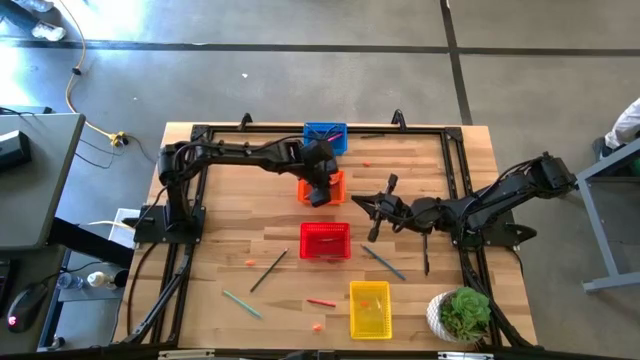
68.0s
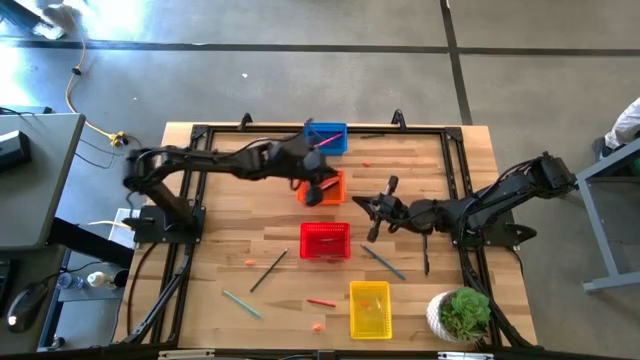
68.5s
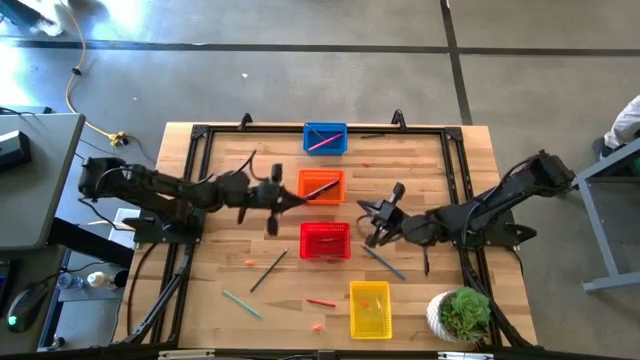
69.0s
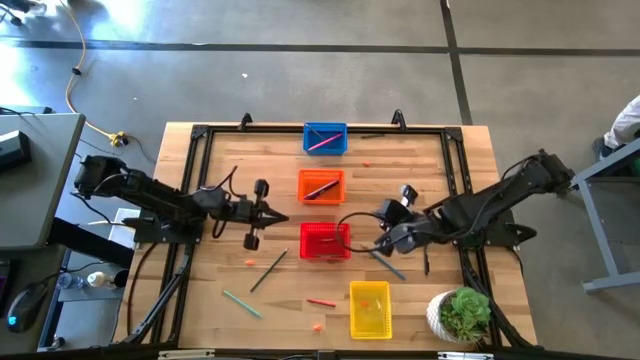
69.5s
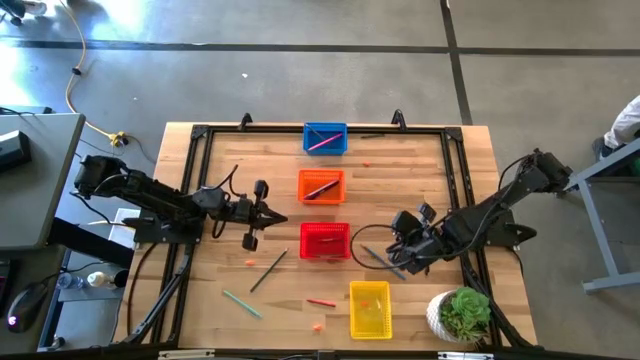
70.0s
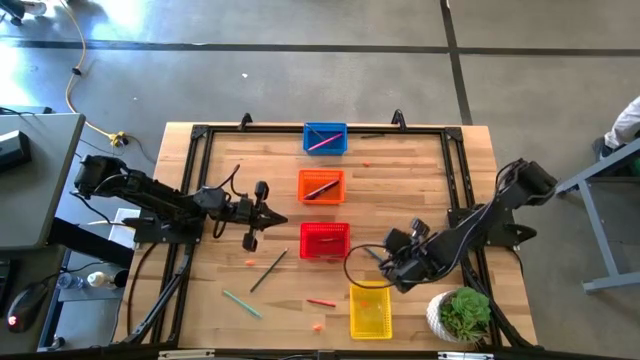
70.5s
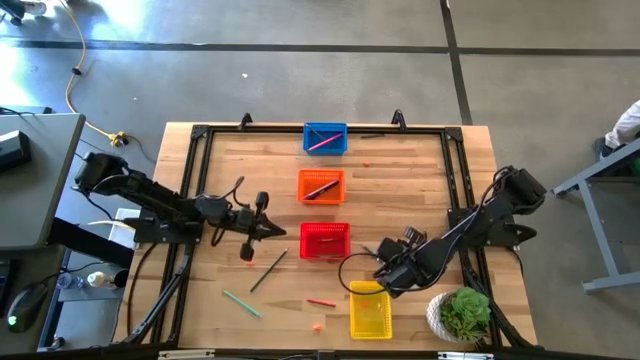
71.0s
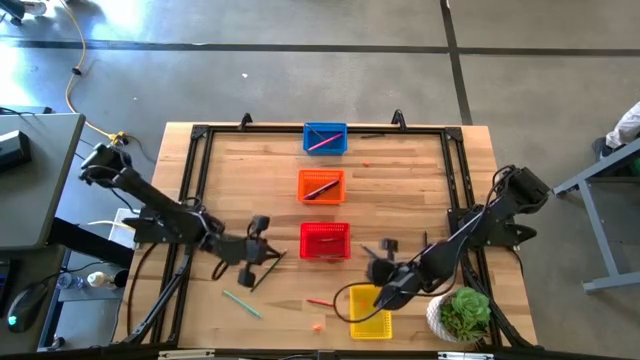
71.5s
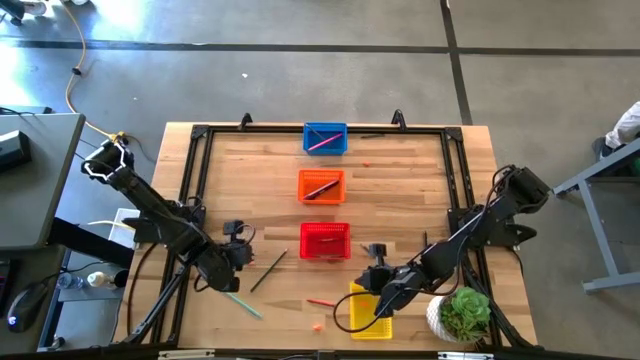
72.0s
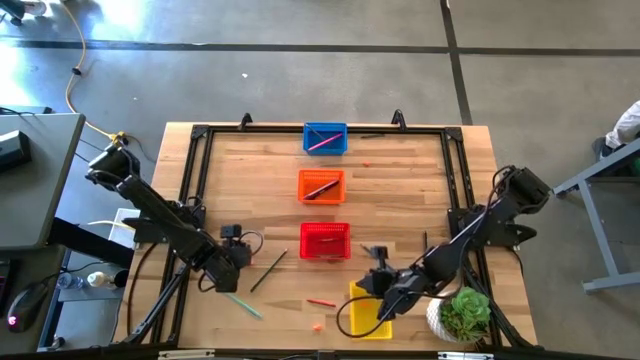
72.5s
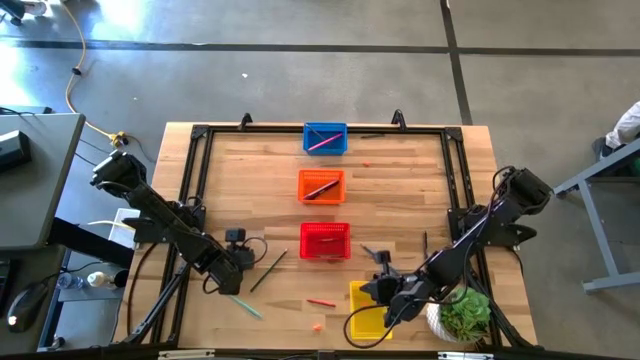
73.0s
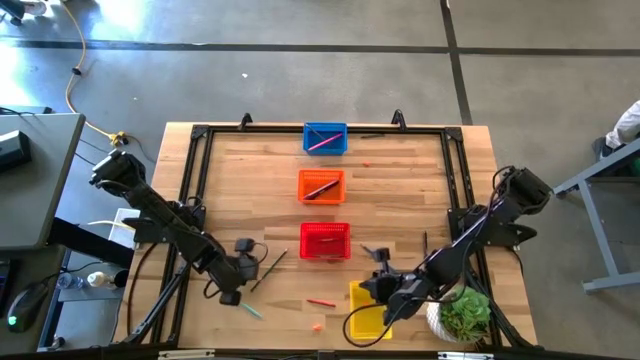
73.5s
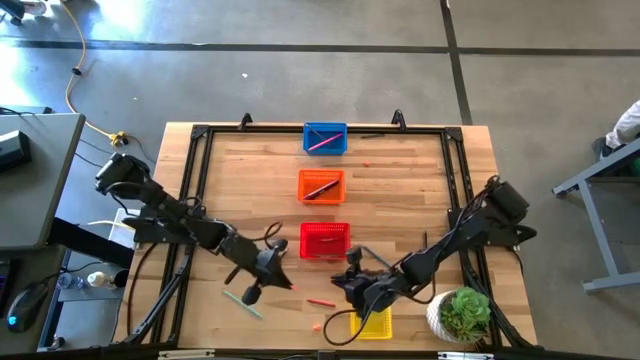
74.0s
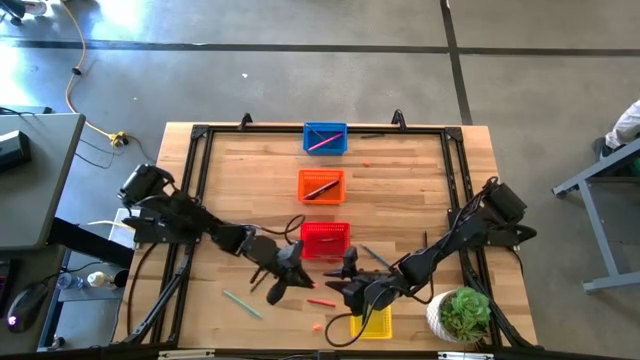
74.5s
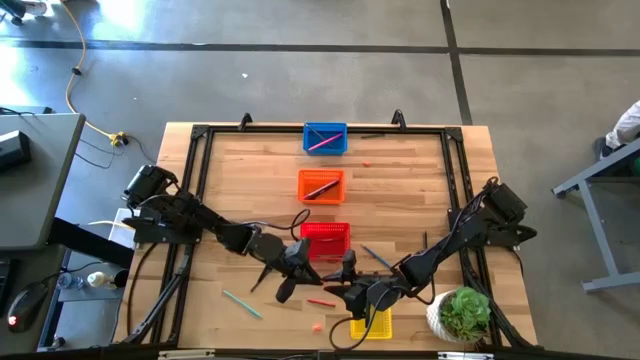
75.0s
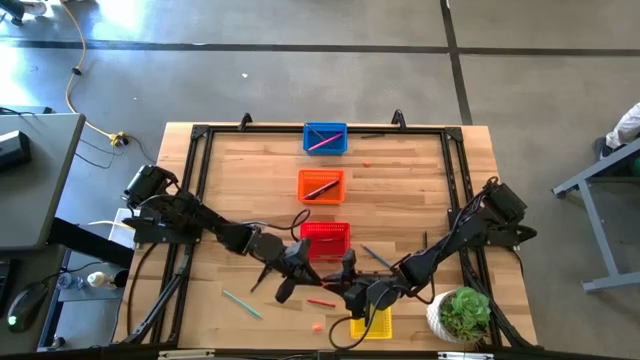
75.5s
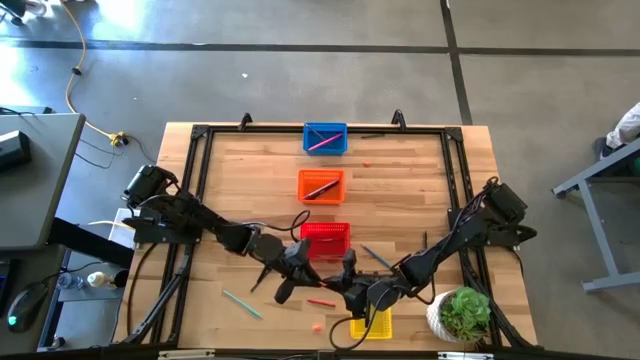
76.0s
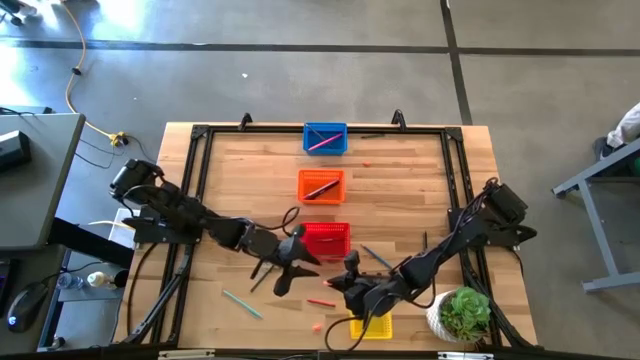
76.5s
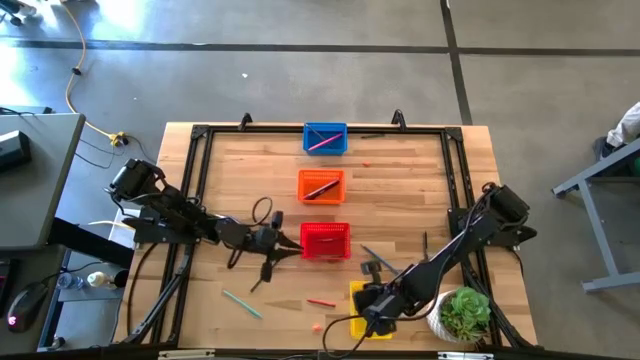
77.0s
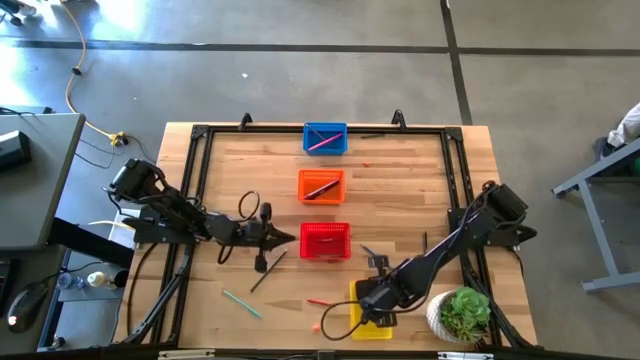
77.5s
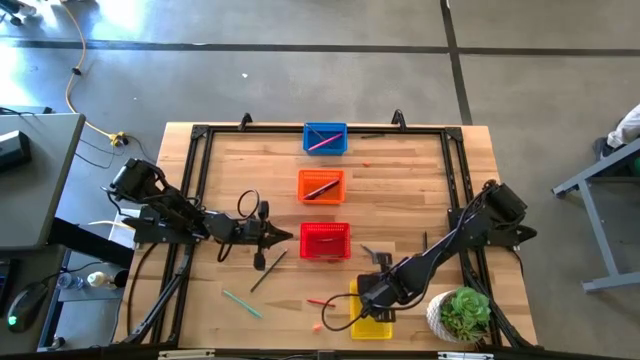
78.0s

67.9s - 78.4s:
Task: Sort crayons/erasers/pens/pencils in bins
Put the orange eraser into the yellow bin

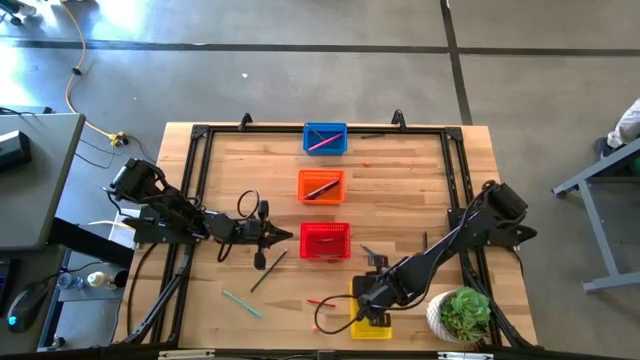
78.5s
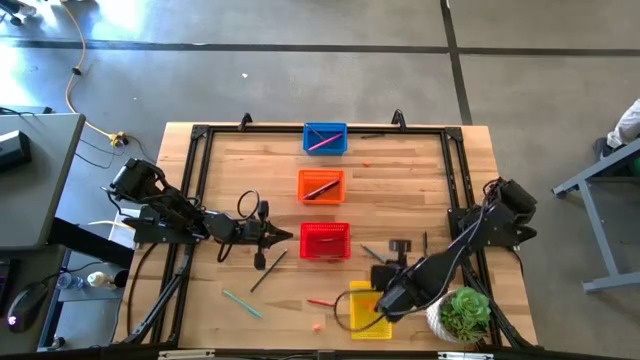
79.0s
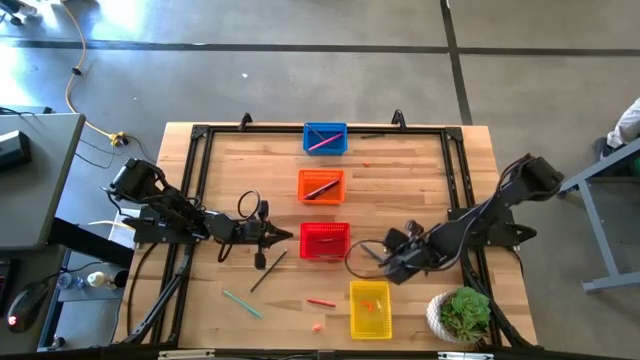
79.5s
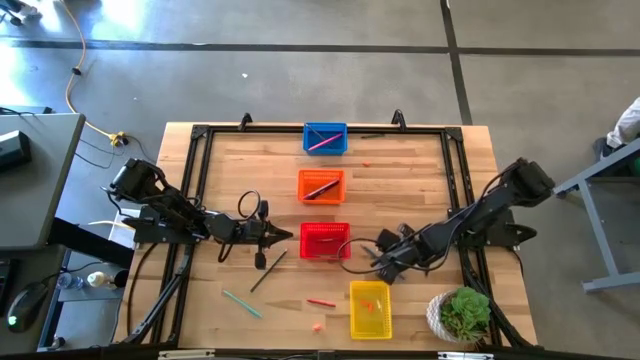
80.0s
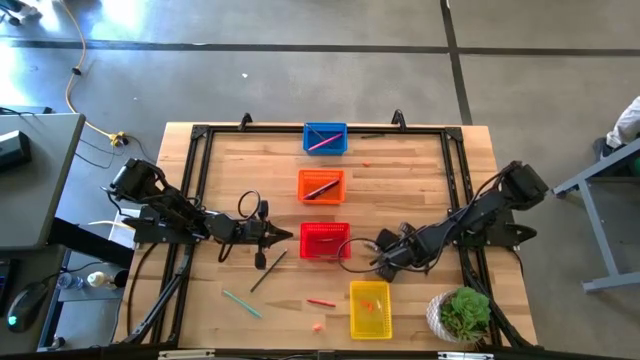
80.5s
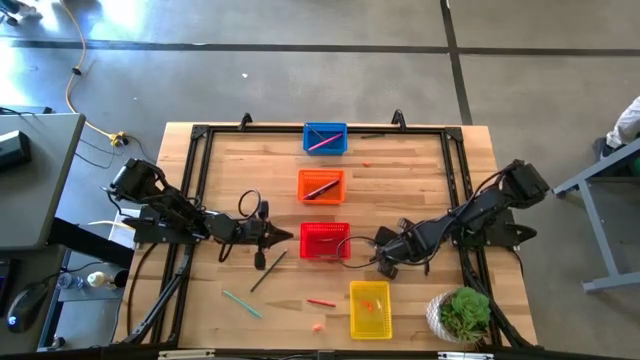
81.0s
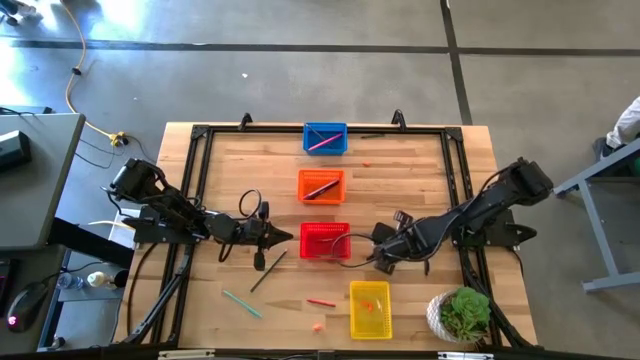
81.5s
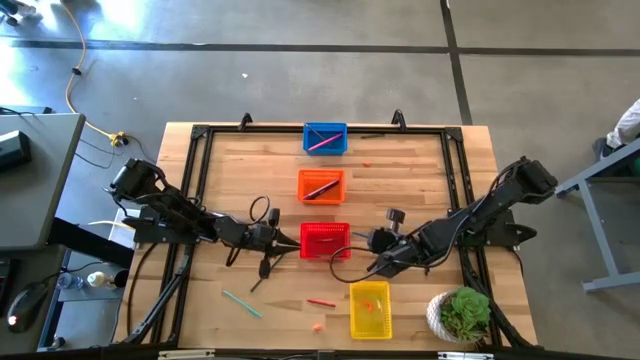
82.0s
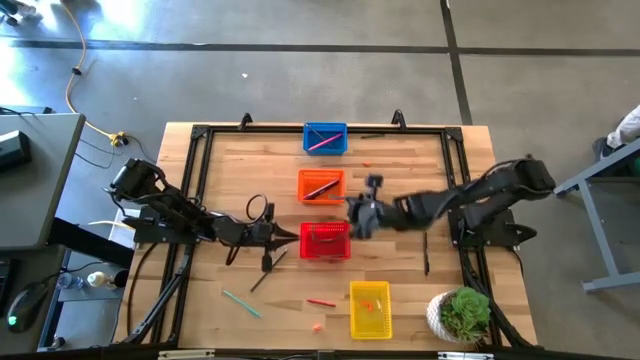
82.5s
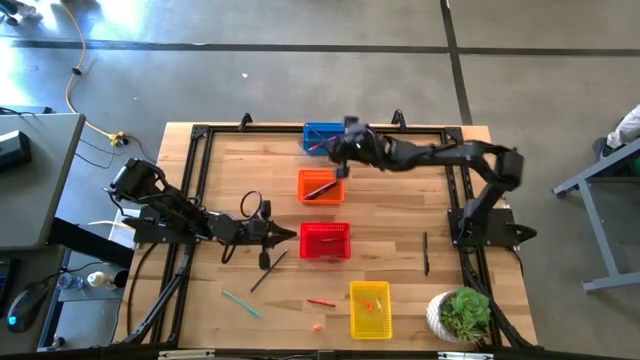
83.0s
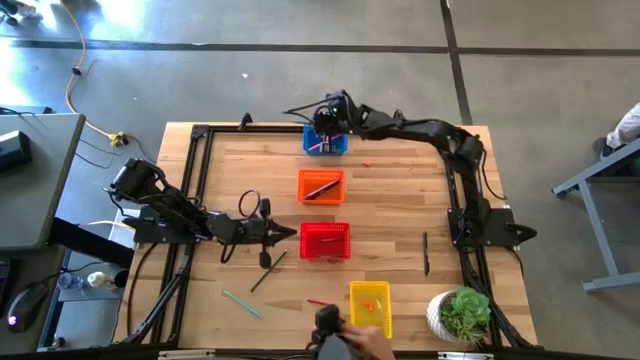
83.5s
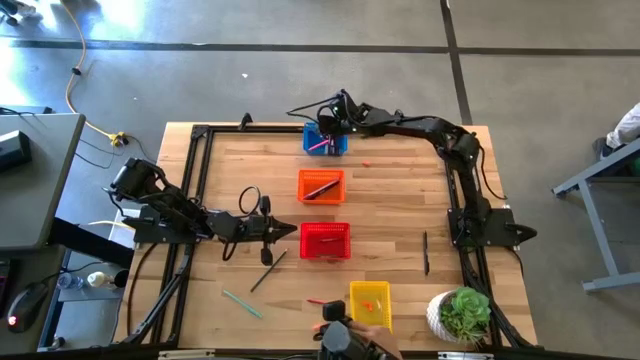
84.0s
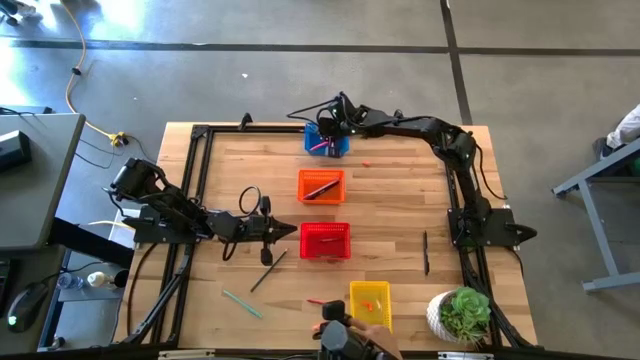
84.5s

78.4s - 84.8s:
Put the blue pencil into the blue bin

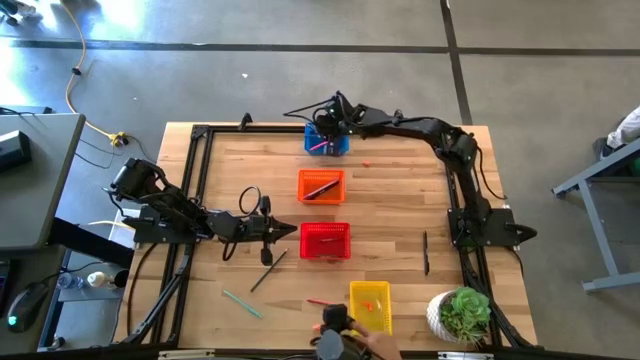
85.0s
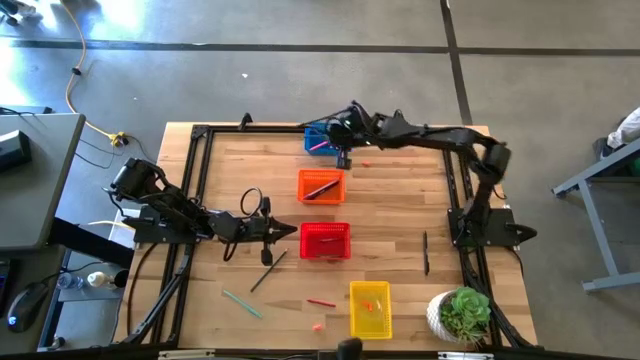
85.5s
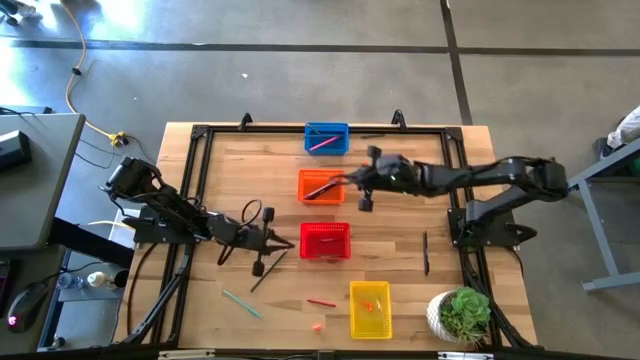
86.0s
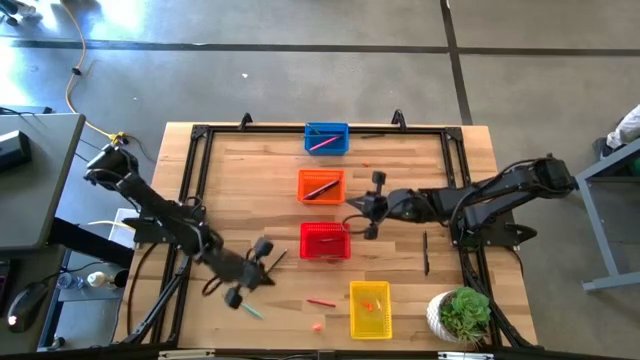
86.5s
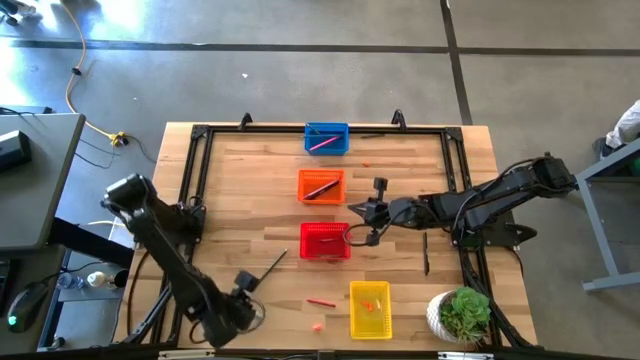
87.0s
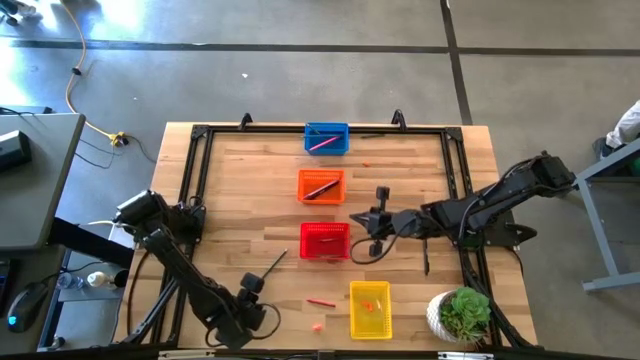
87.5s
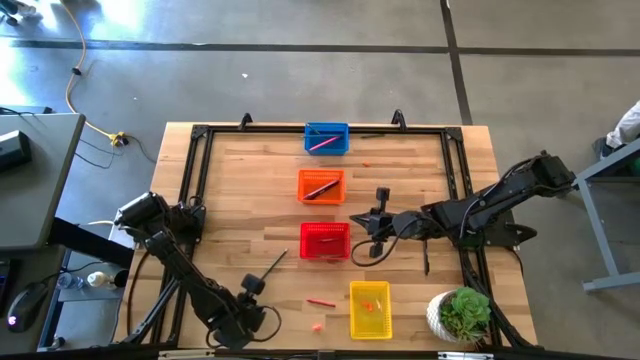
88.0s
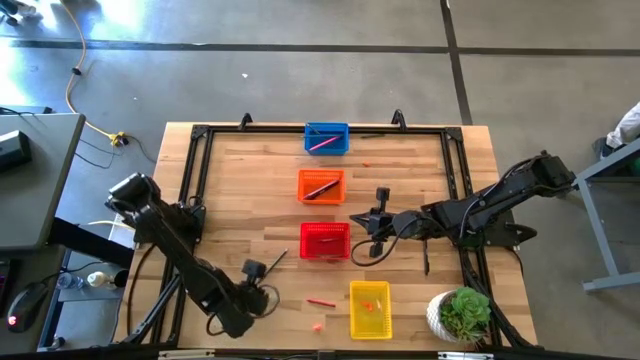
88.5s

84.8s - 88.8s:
Put the blue pen into the orange bin

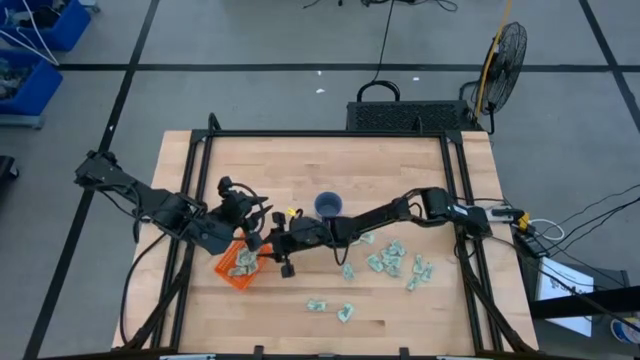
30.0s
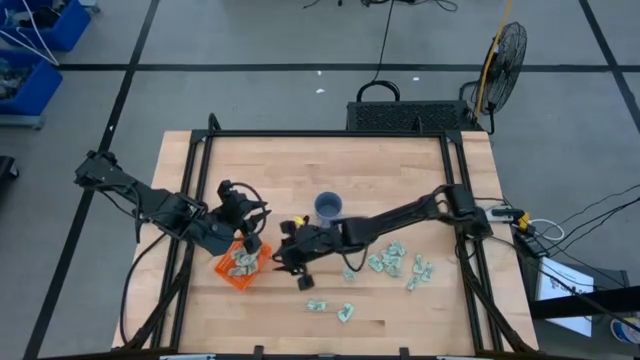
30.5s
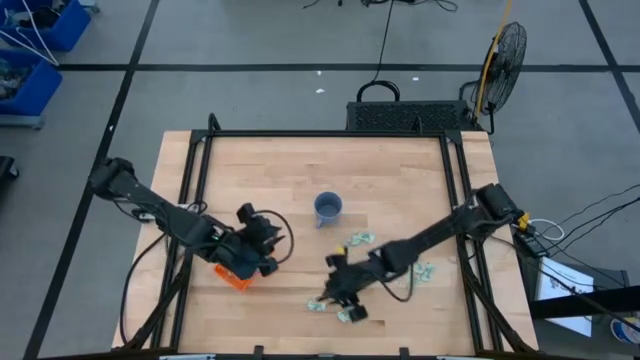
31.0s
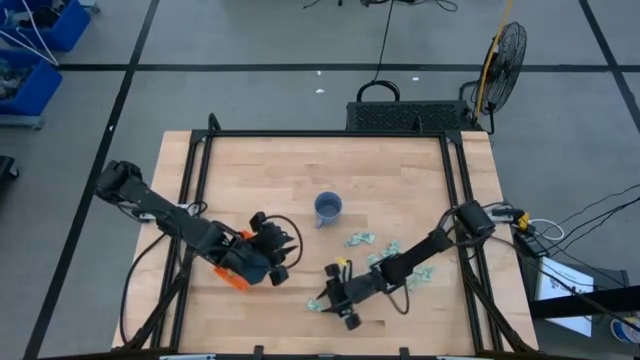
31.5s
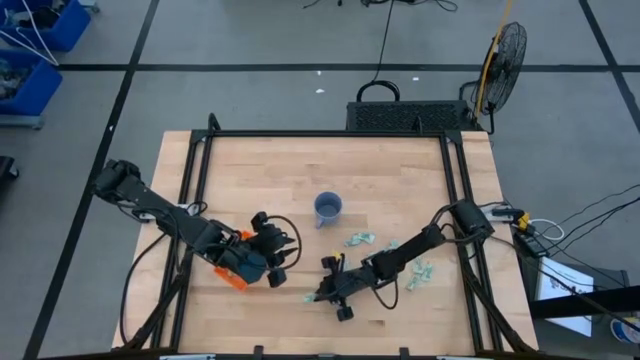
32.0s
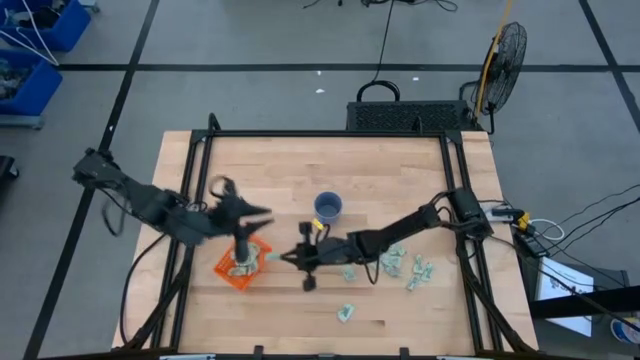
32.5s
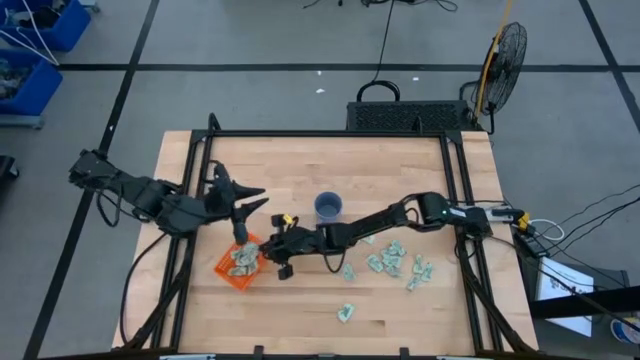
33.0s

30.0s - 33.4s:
Task: Pick and place Stevia / Truvia into bins
Put the green stevia packet into the orange basket
